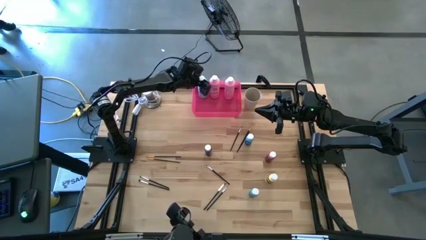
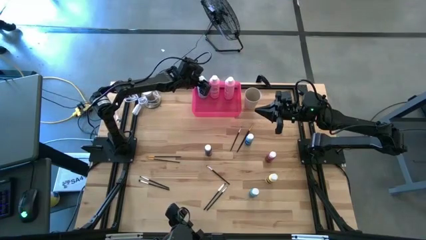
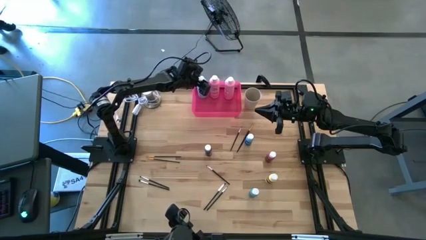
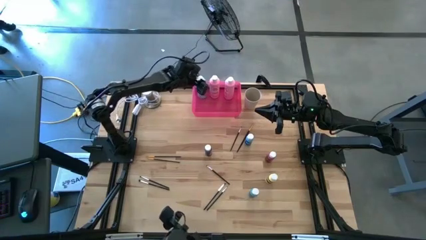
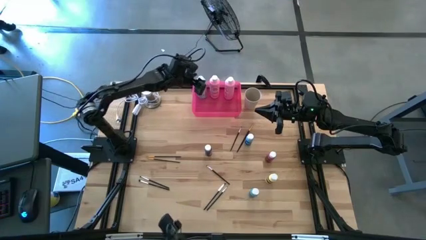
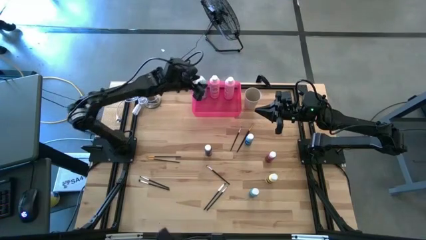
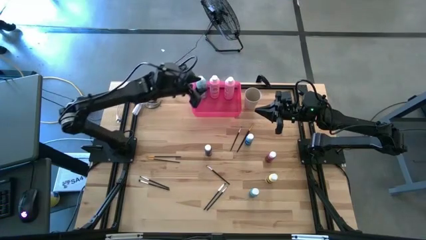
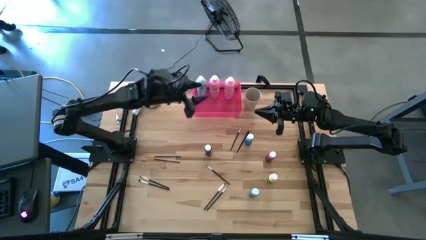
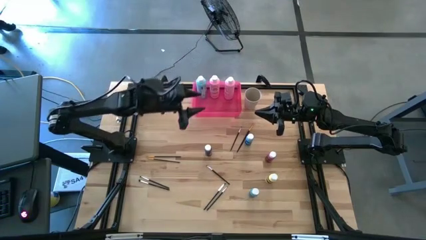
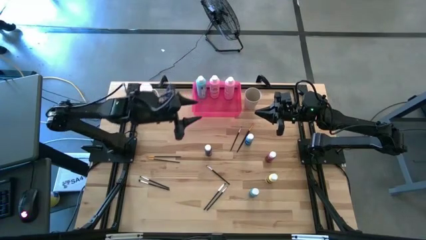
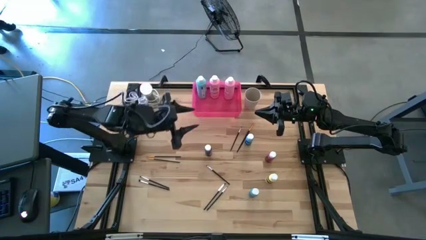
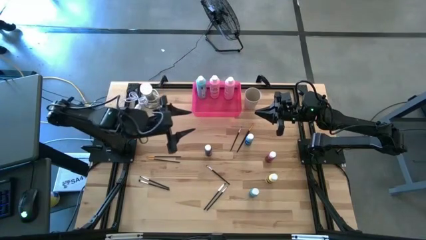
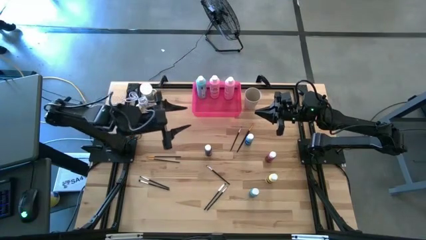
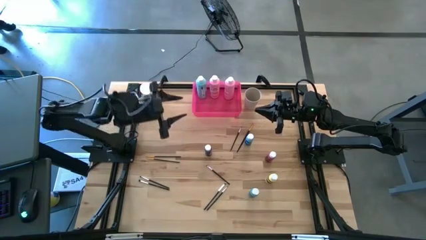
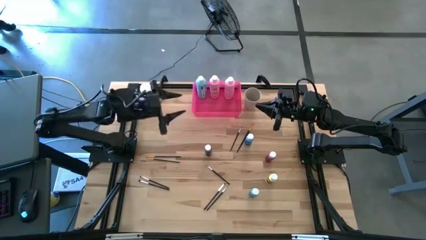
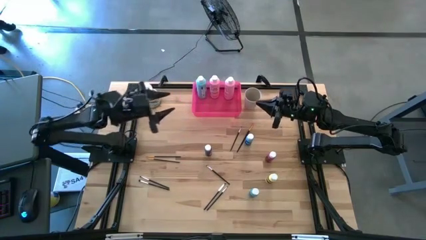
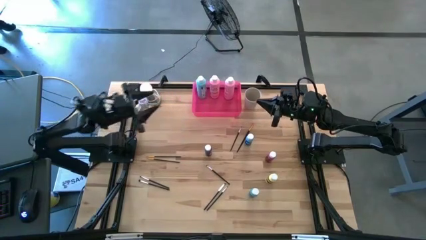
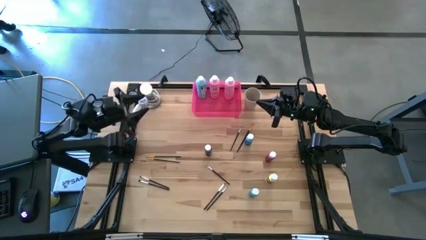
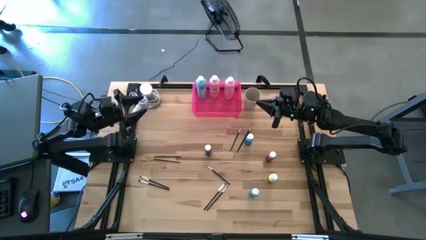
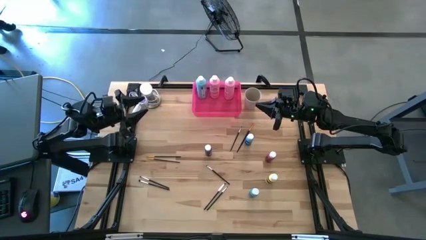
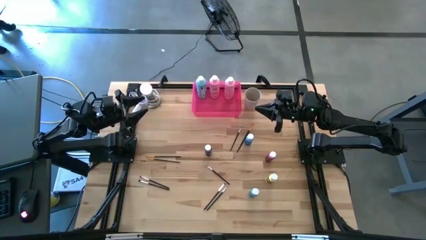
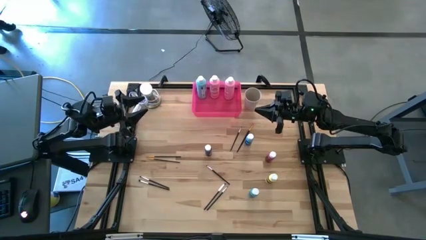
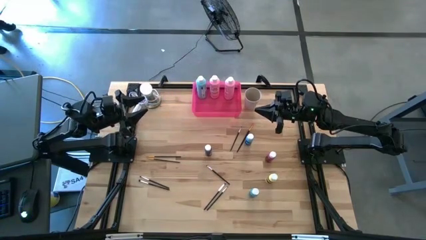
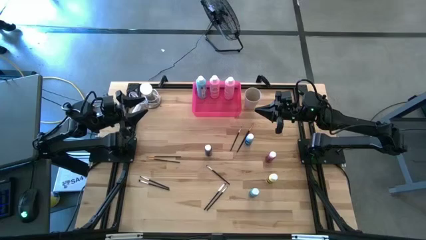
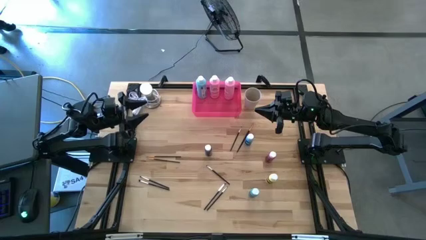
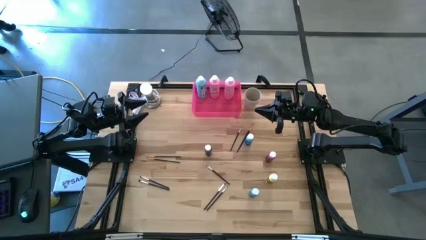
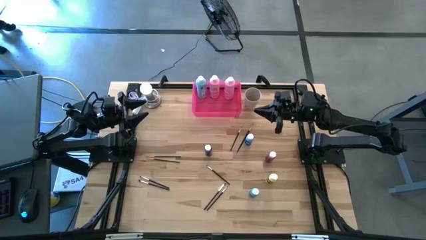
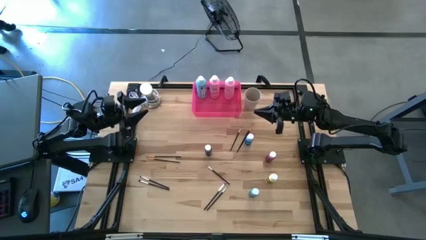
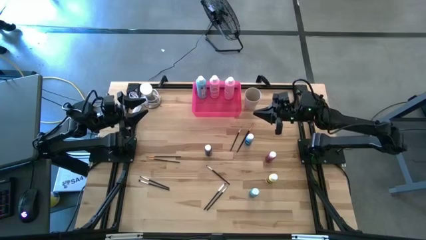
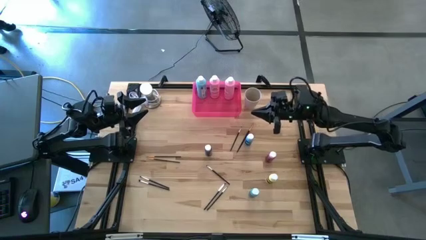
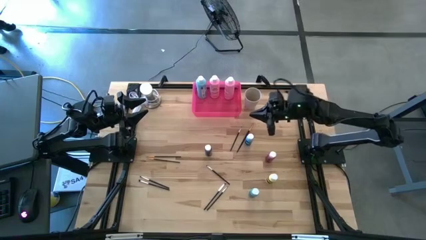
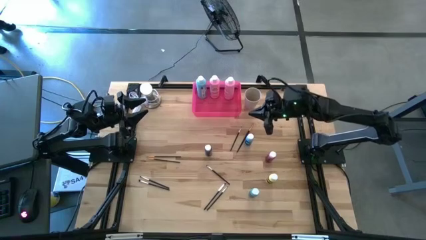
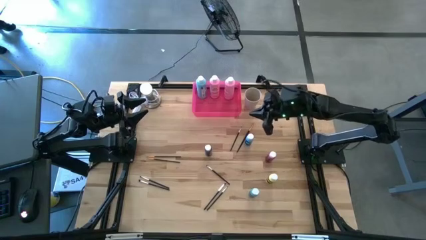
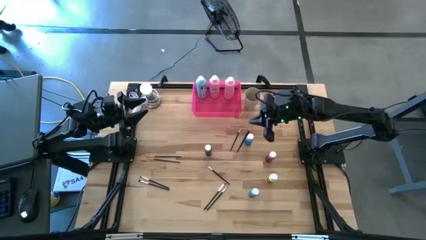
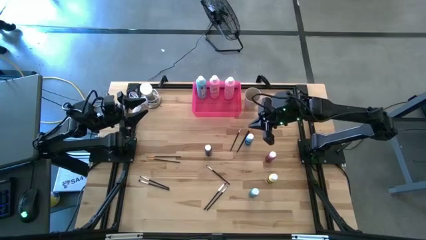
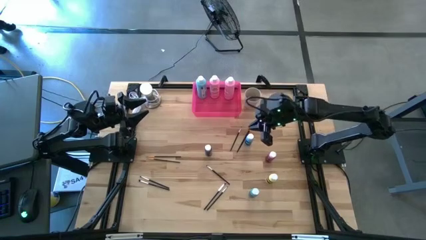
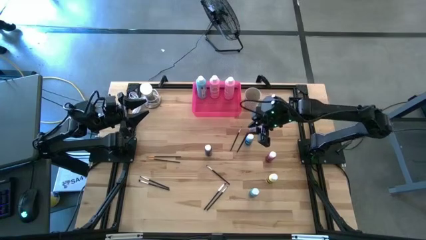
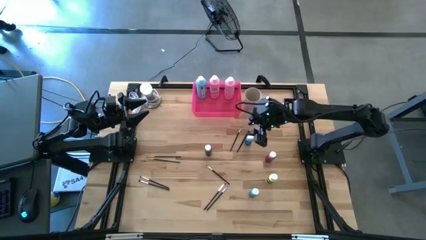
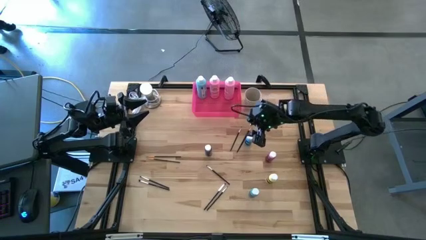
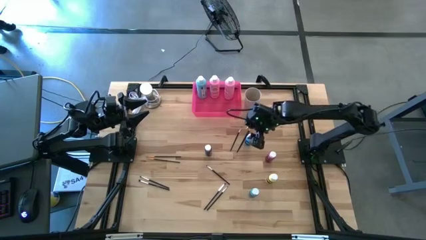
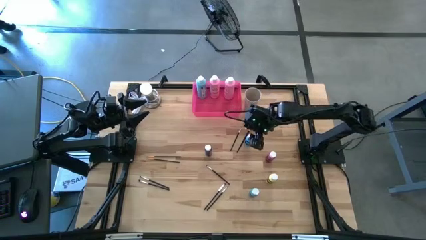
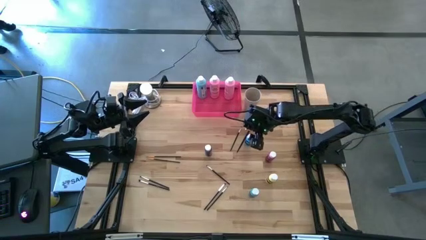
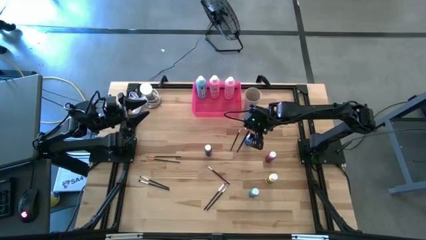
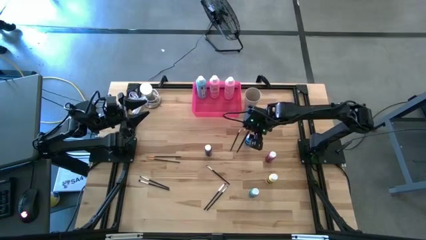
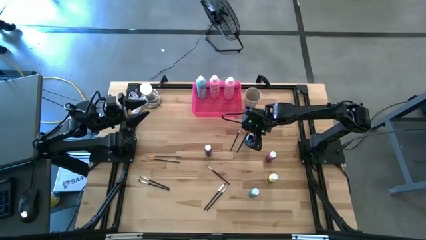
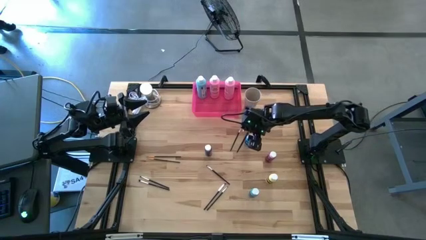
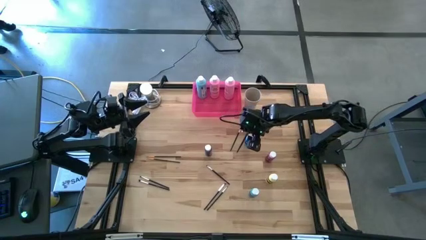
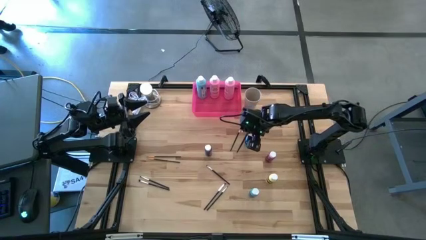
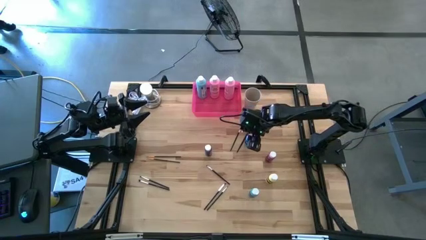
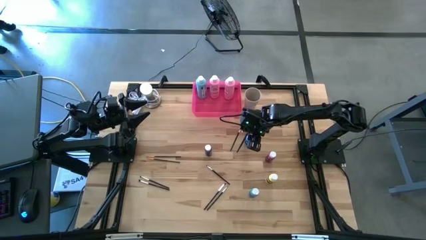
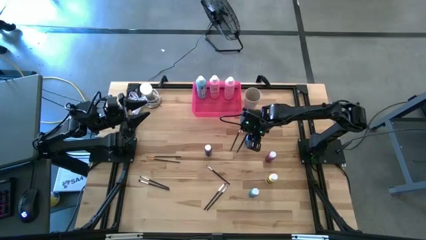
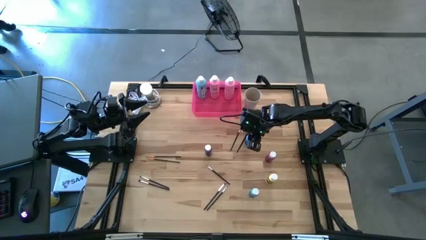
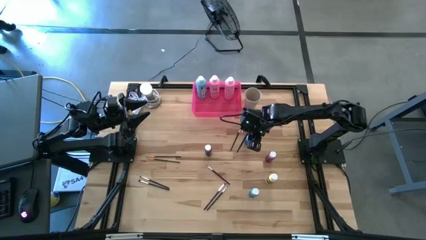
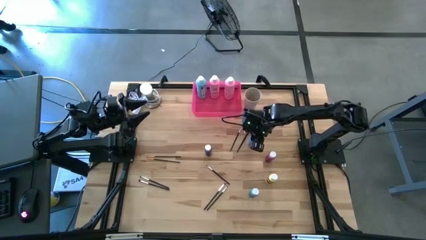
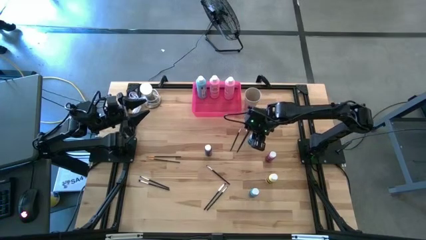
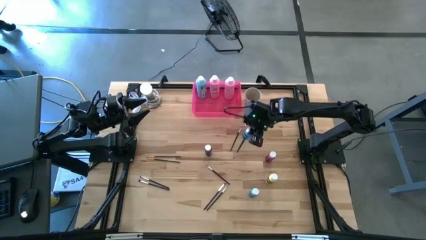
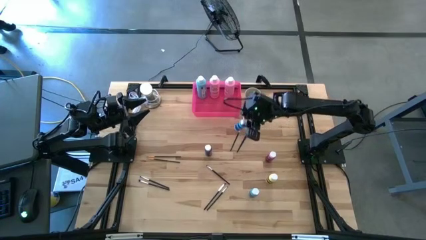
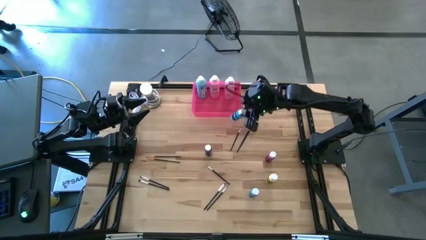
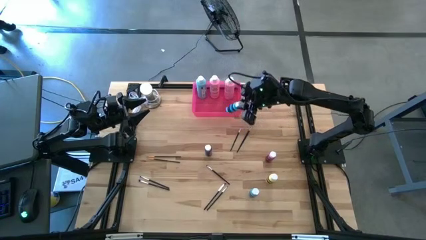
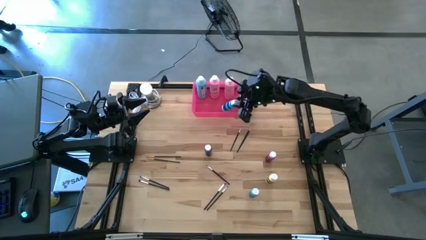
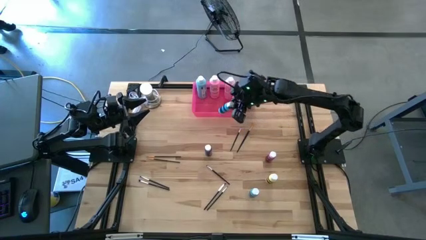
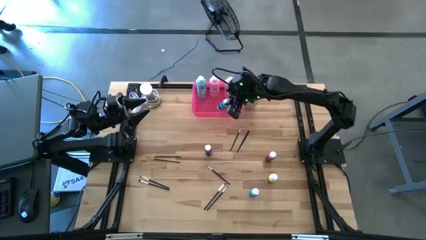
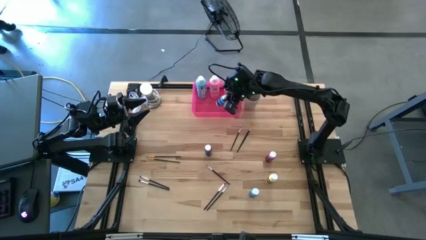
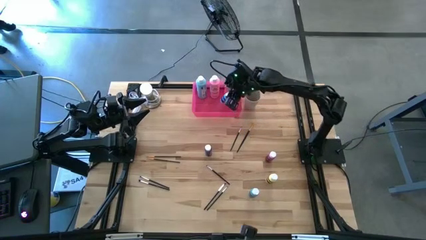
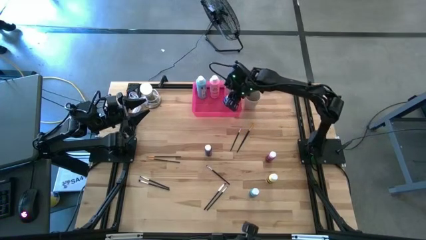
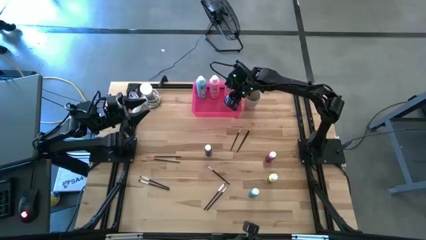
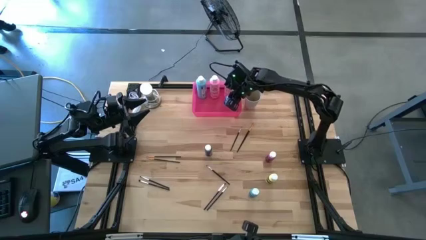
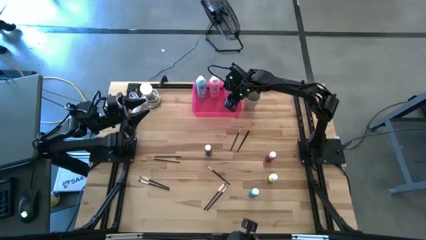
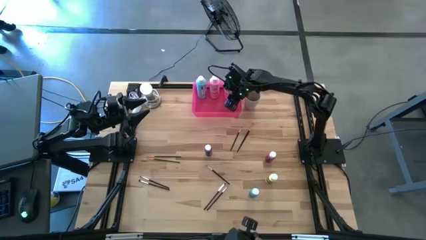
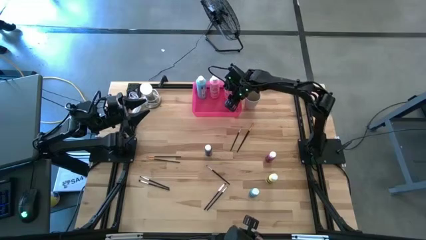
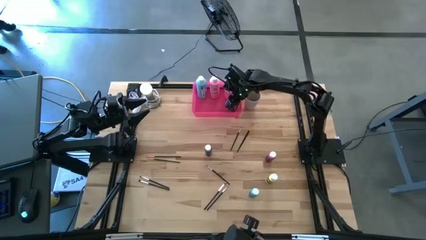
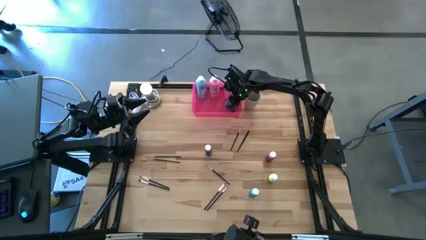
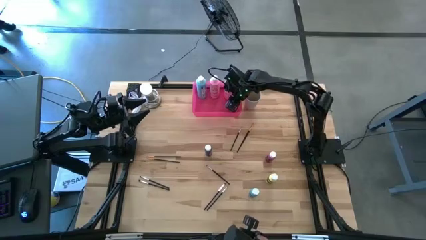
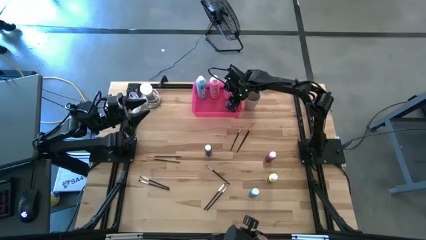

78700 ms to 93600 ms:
Task: Pick & Place Paint Supplies
Put the small blue paint bottle into the pink bin
